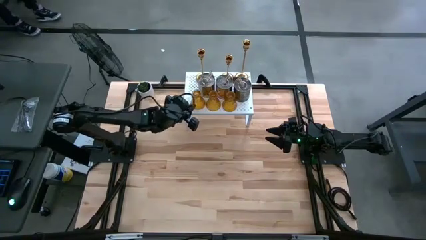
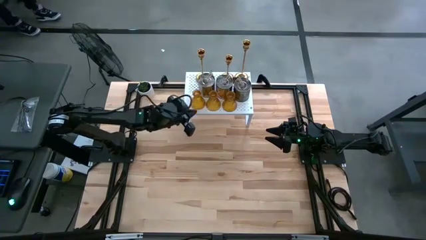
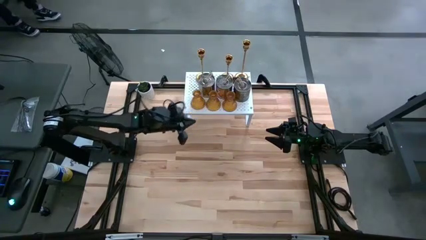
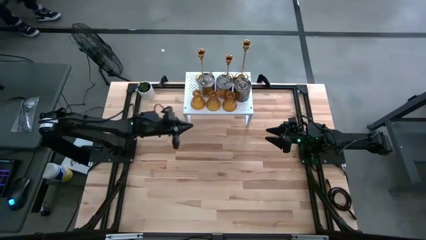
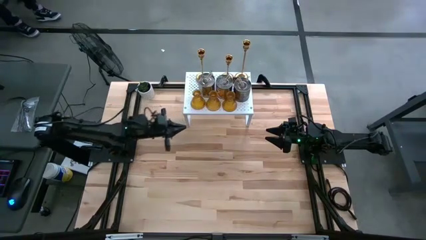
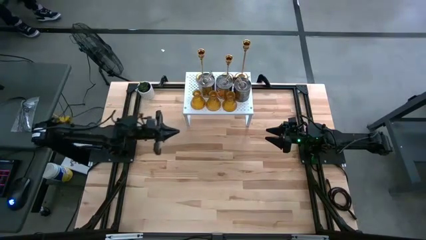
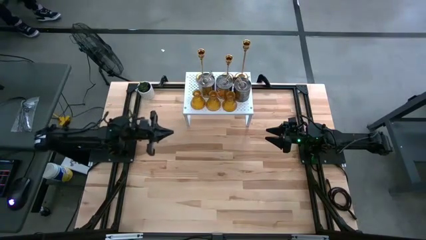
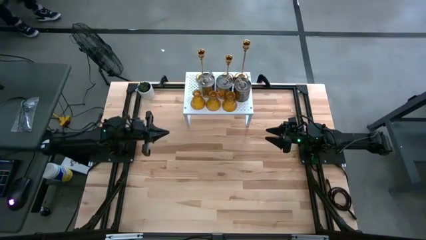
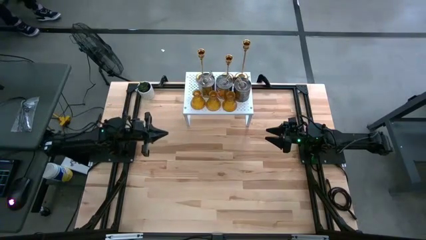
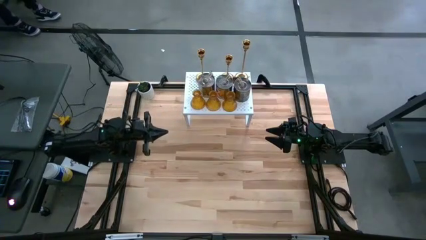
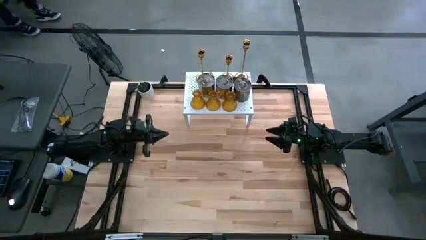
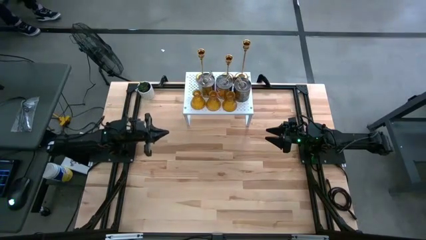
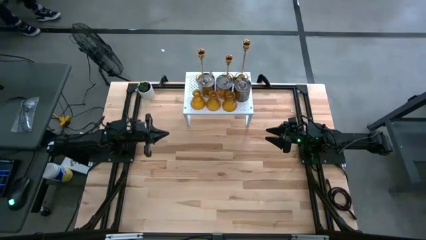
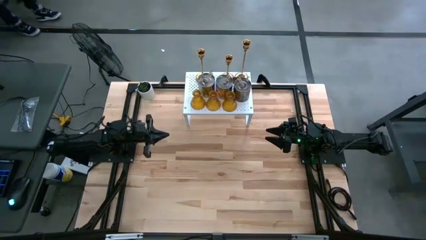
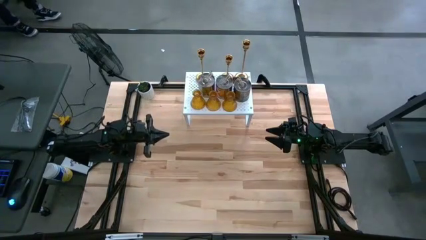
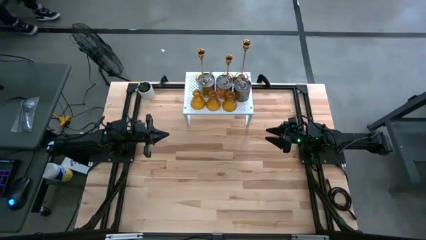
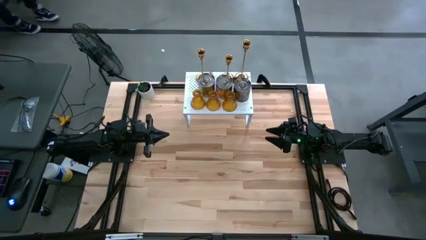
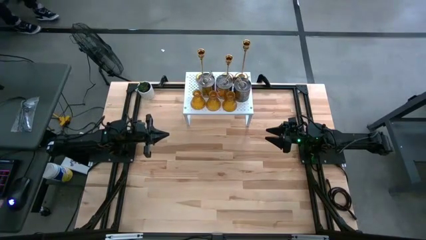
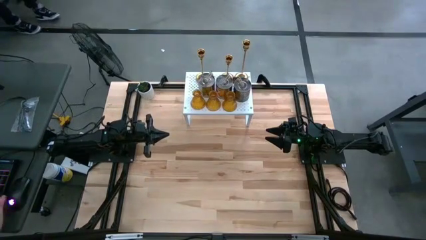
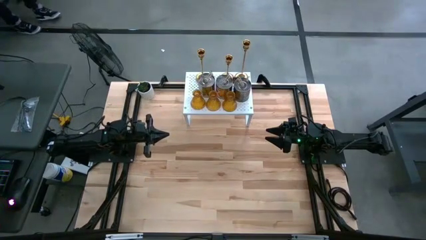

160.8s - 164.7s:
Task: Pick & Place candle stick holders
Return to Home Position

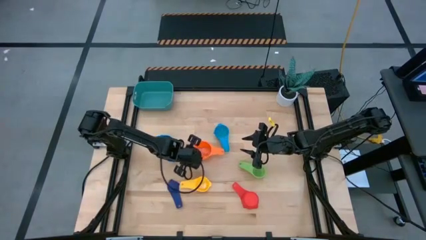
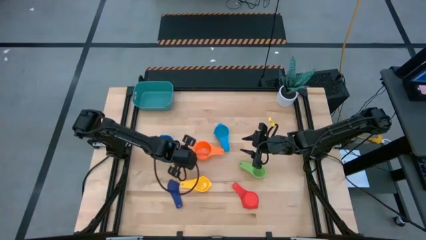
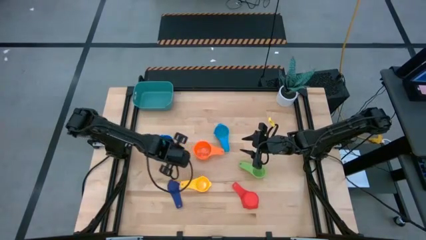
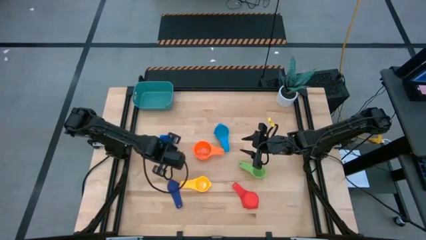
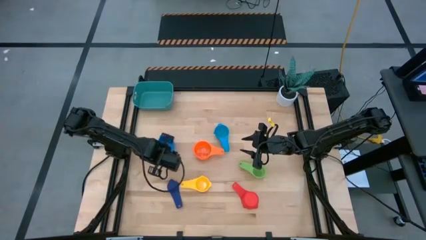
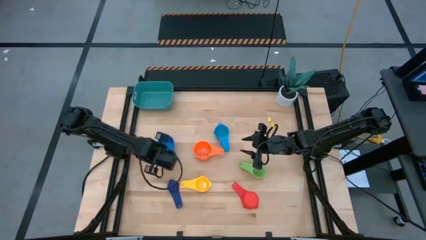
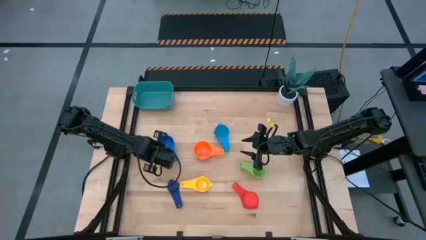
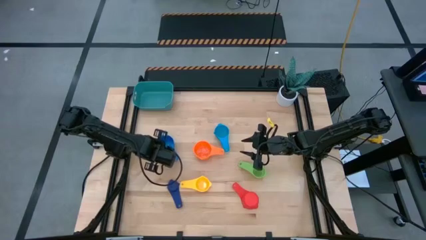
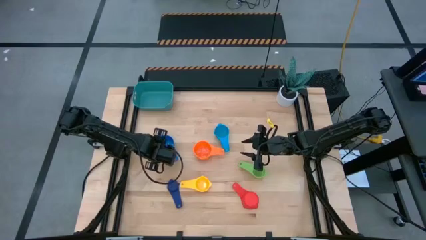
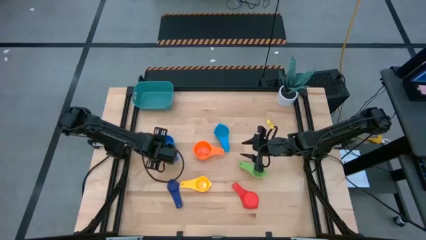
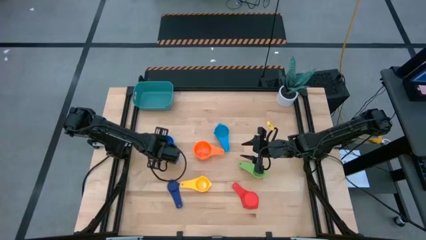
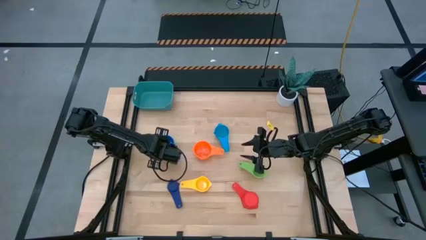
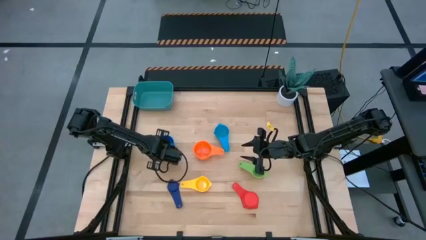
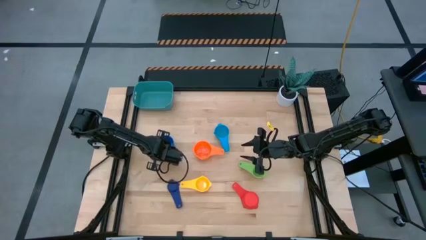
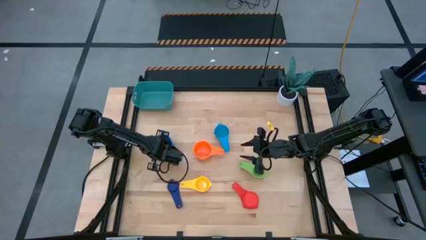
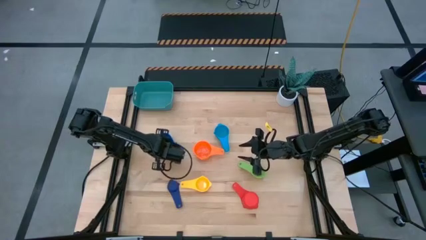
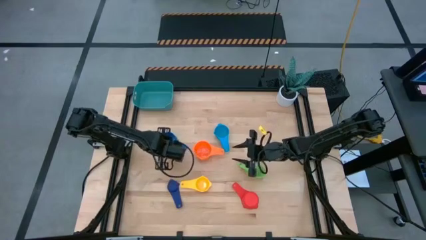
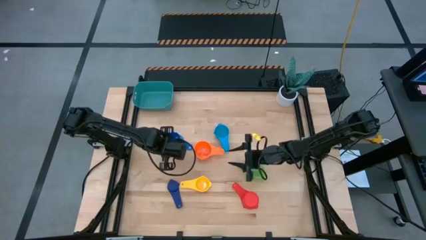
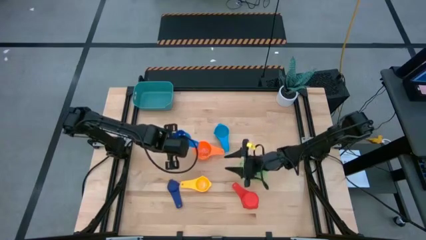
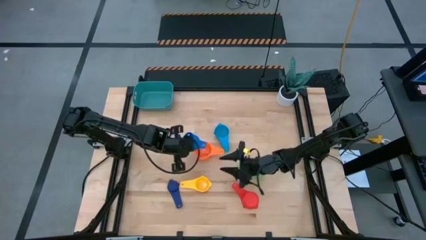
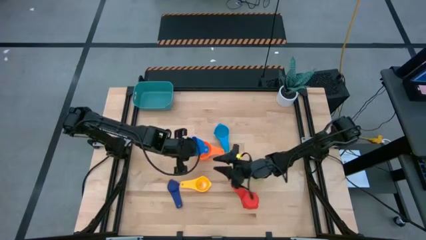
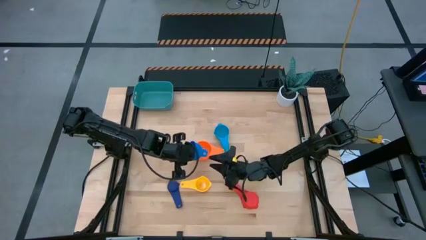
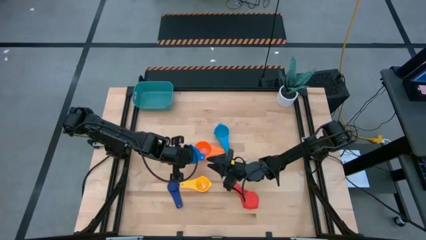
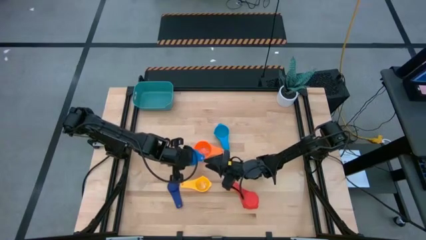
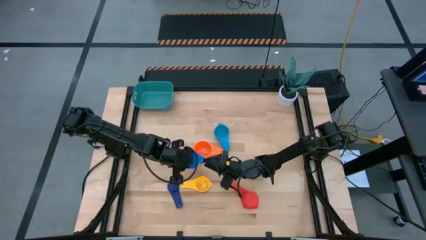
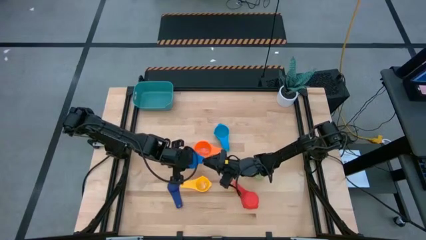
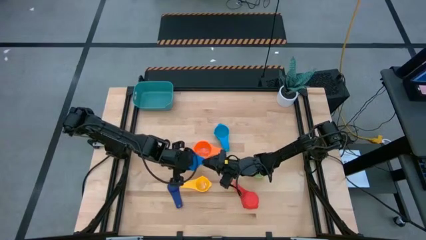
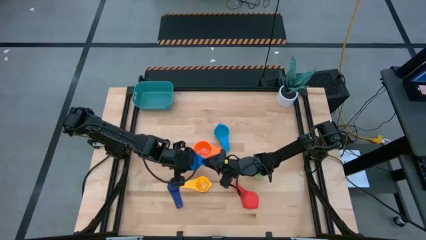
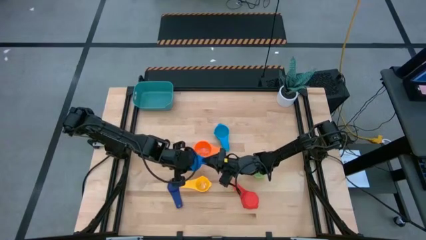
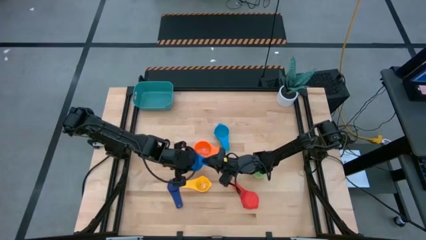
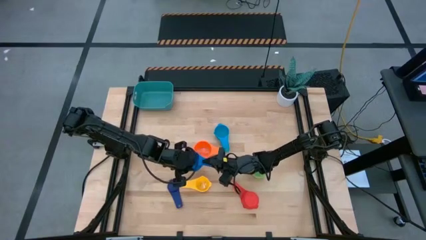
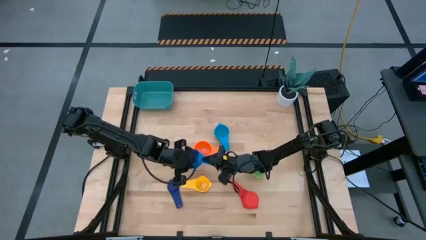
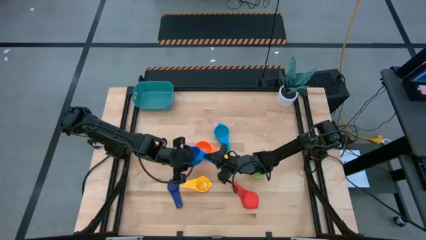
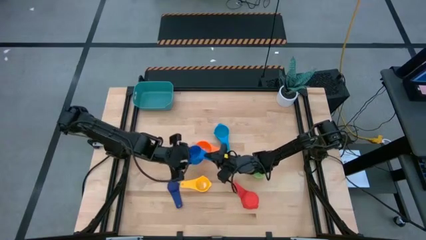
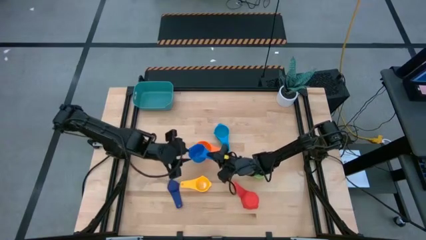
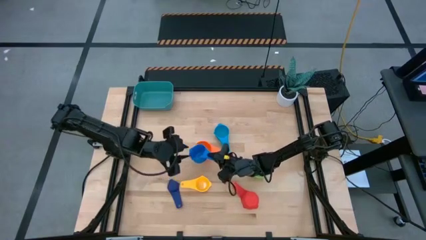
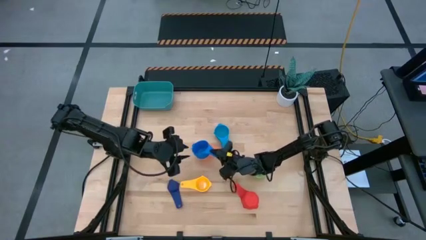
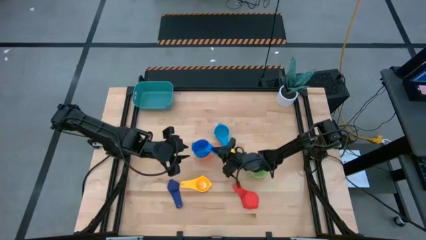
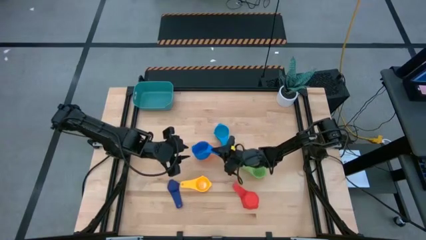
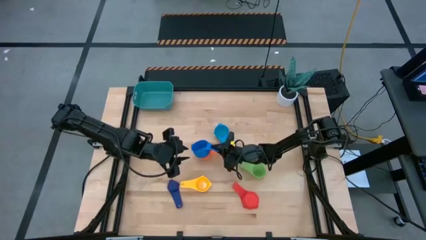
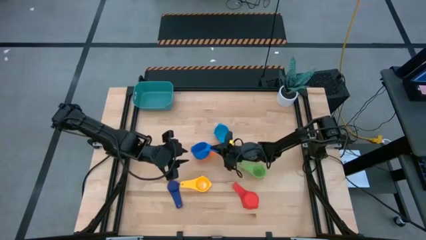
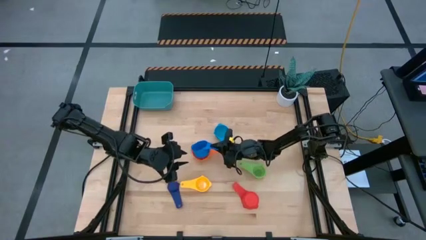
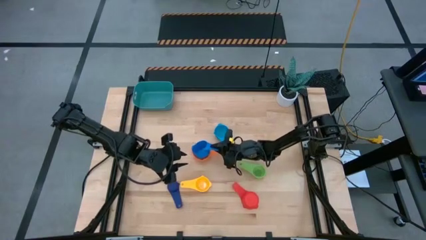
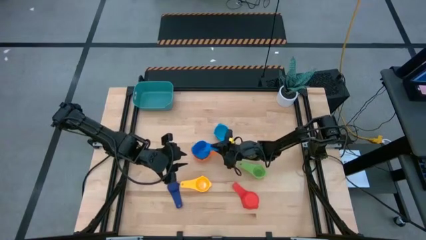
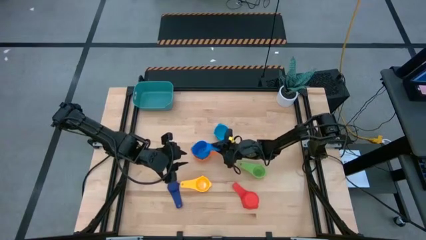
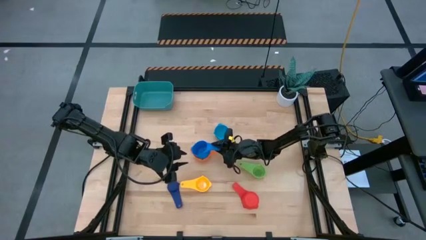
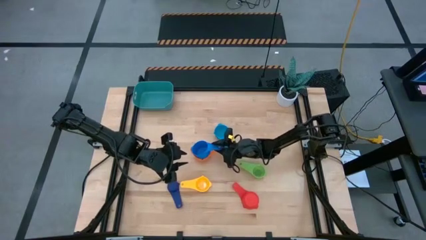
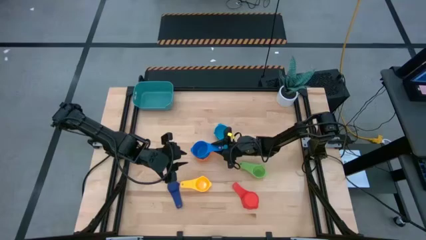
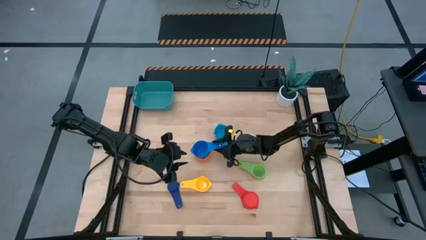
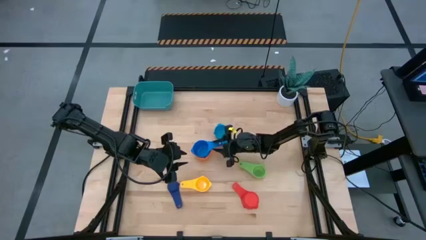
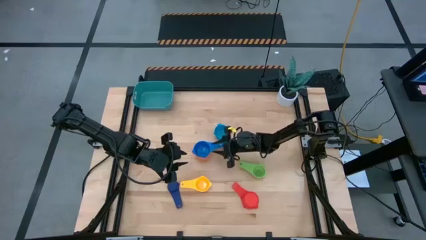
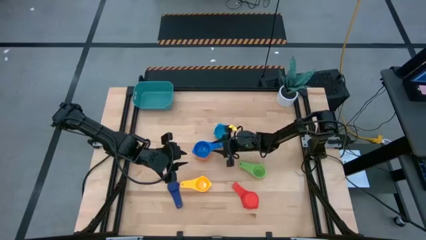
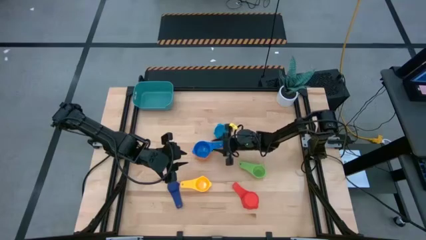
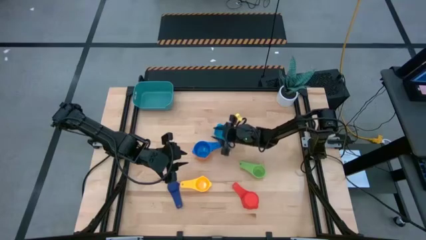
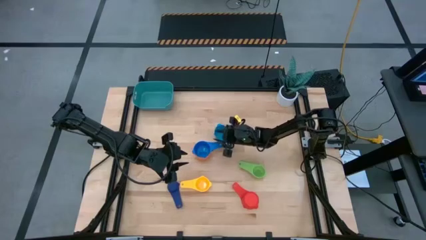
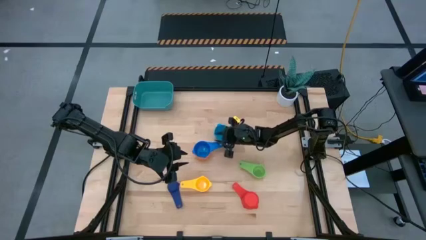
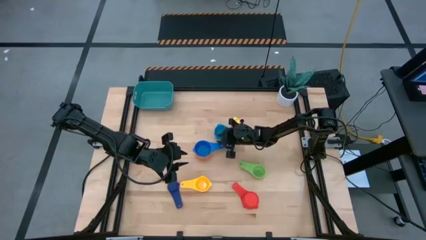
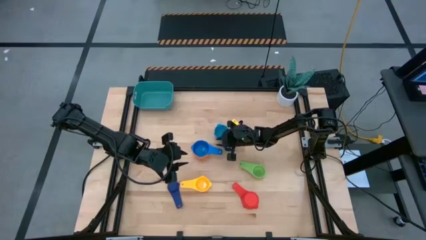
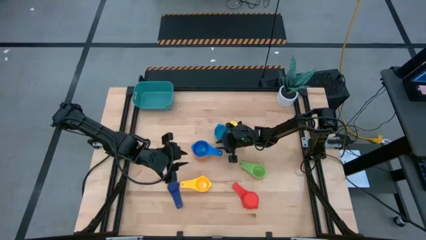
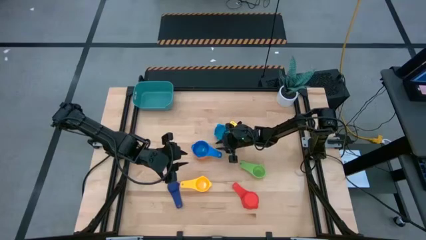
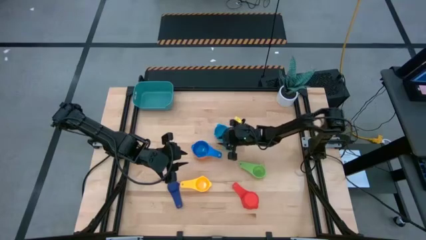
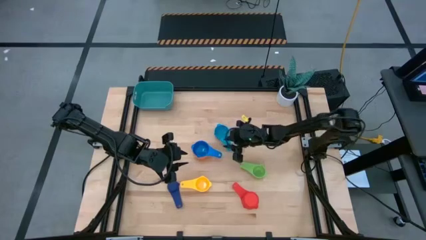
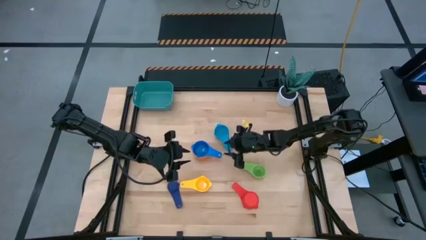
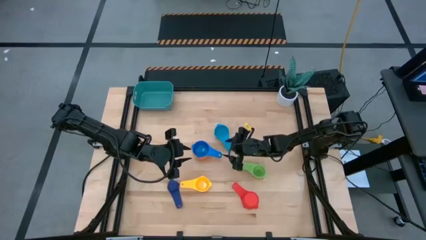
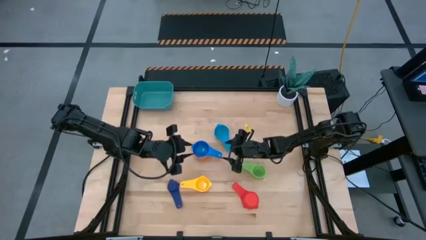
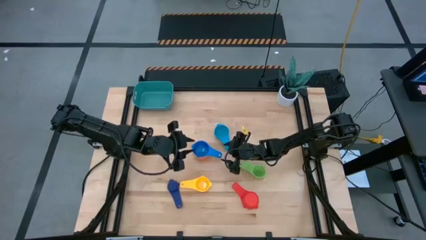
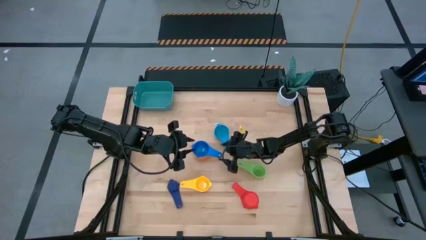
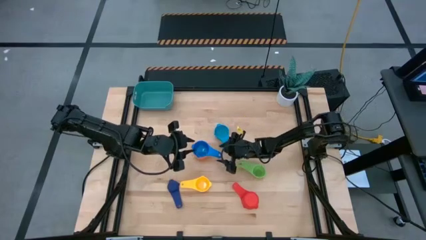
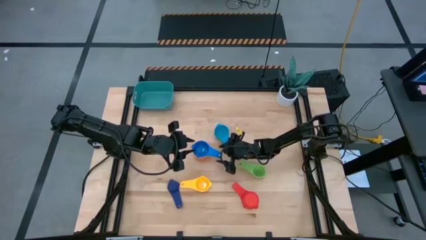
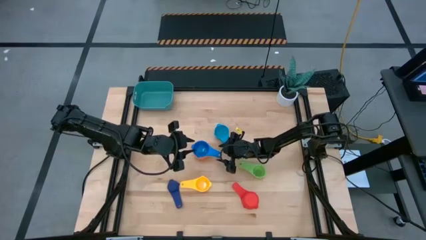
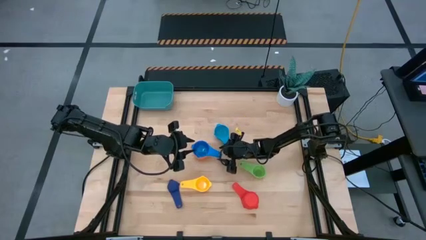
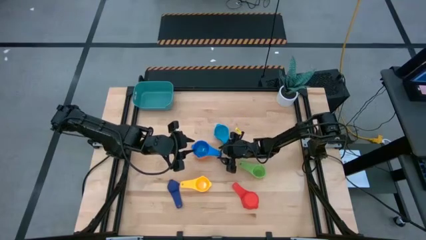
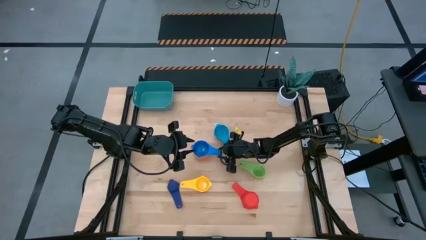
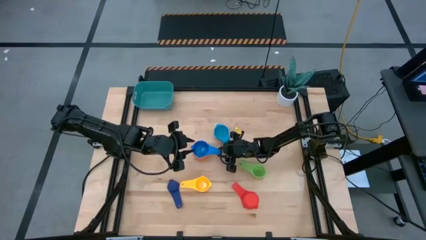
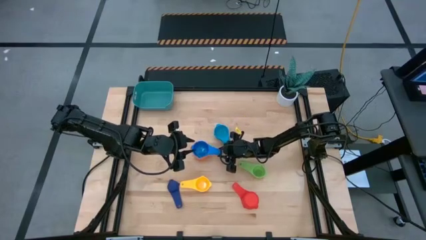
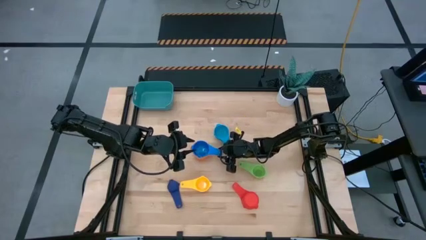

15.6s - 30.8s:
Task: Nest measuring cups in basket
Stack the blue measuring cup on top of the orange measuring cup
